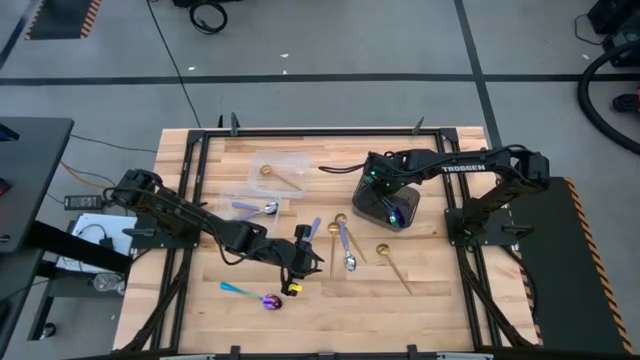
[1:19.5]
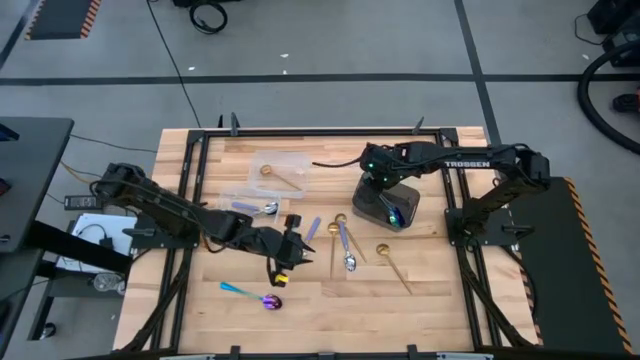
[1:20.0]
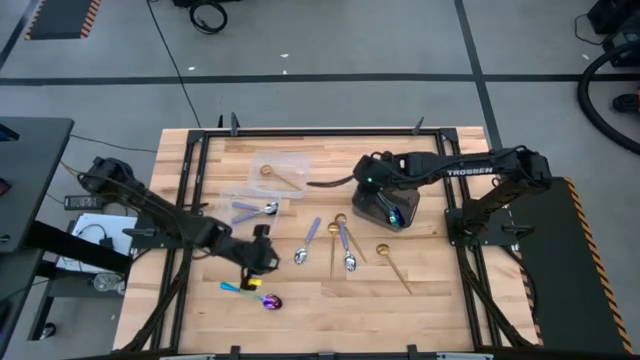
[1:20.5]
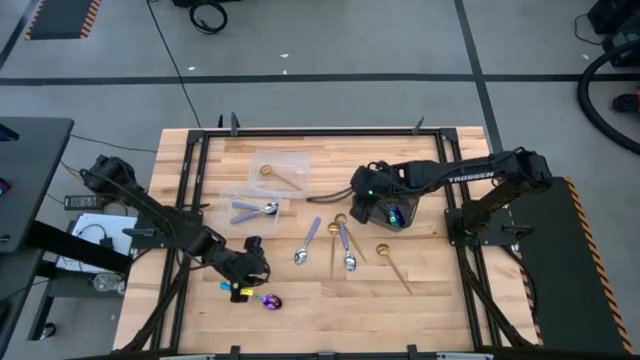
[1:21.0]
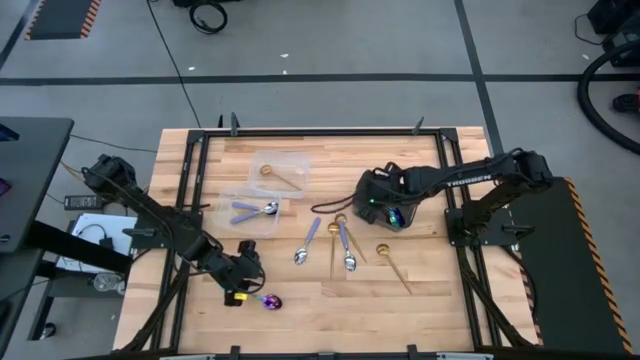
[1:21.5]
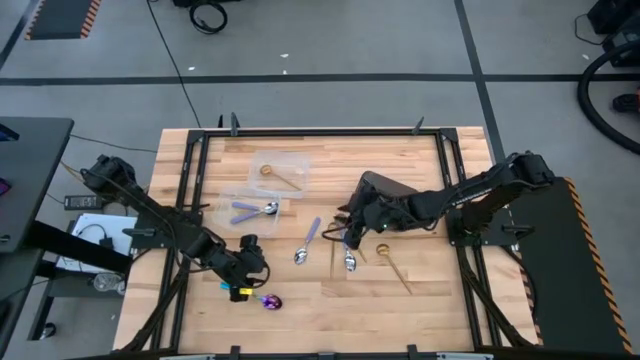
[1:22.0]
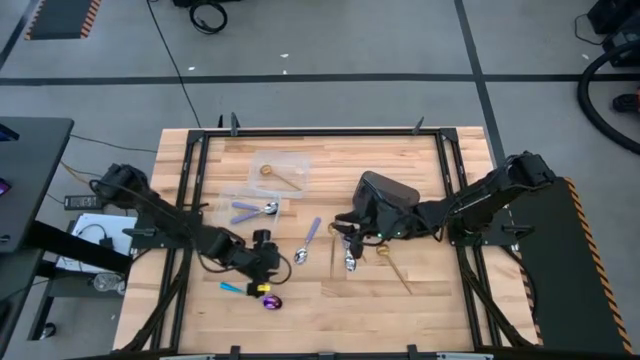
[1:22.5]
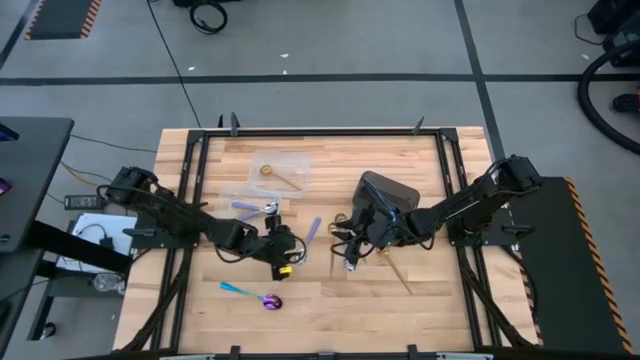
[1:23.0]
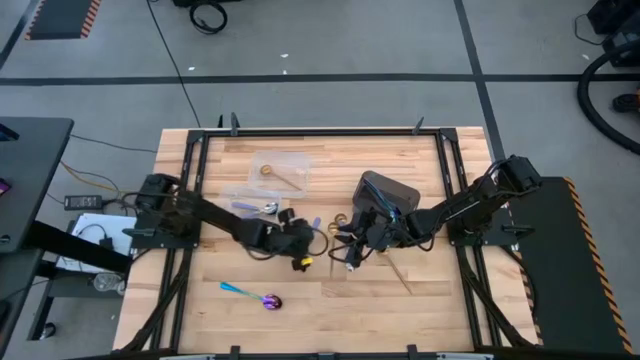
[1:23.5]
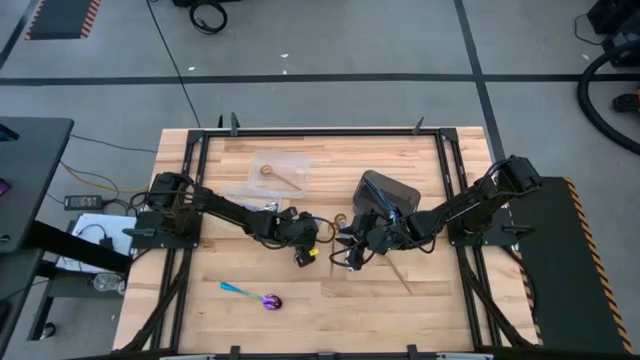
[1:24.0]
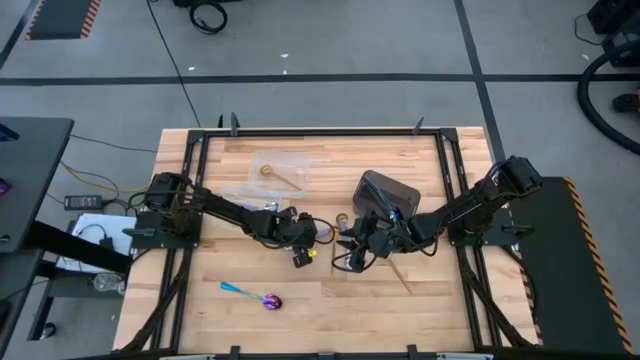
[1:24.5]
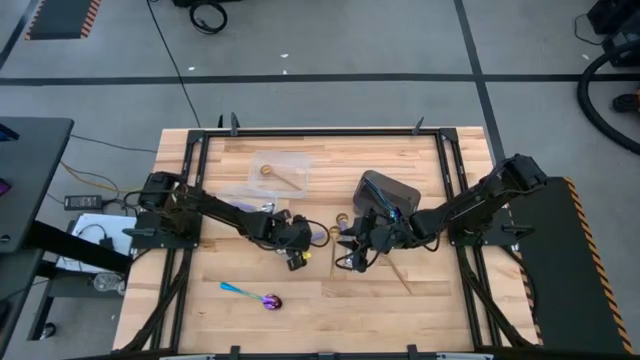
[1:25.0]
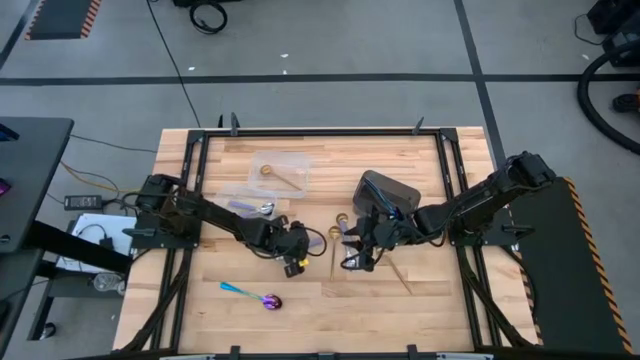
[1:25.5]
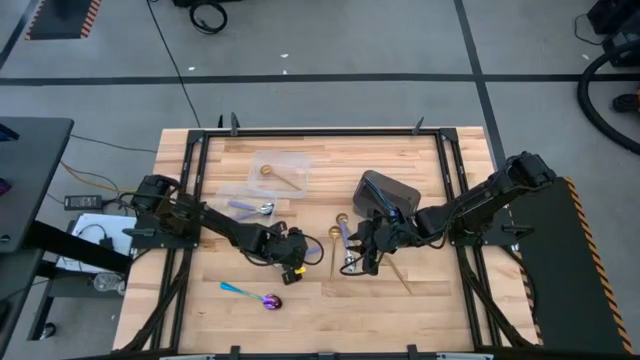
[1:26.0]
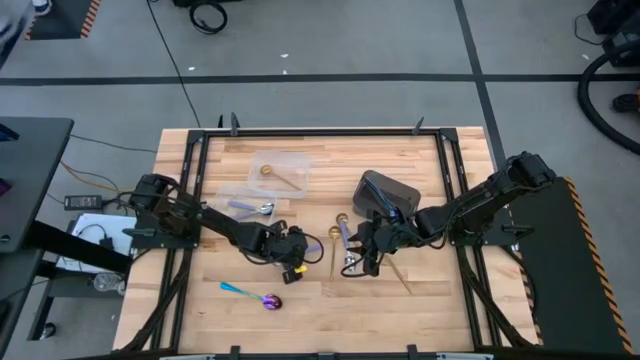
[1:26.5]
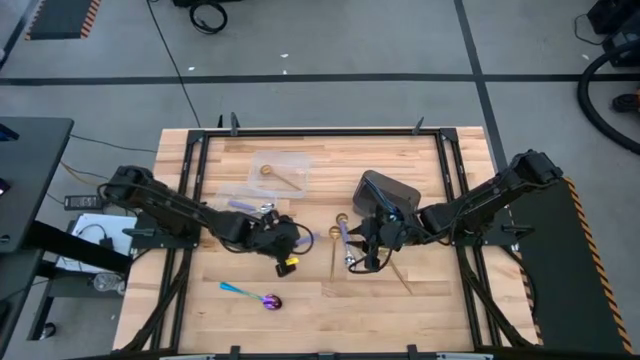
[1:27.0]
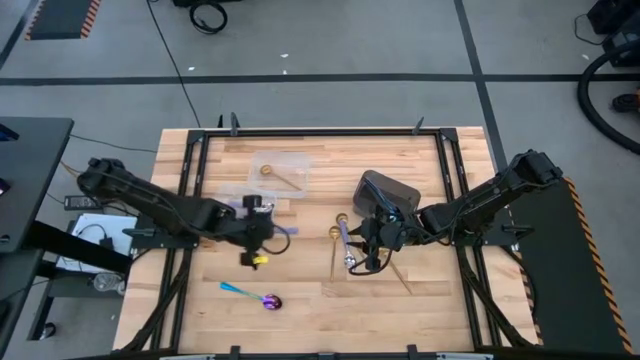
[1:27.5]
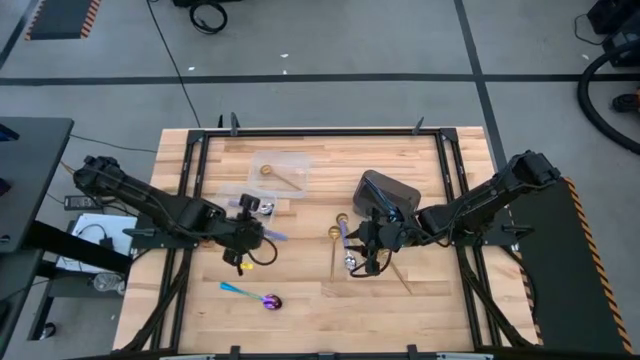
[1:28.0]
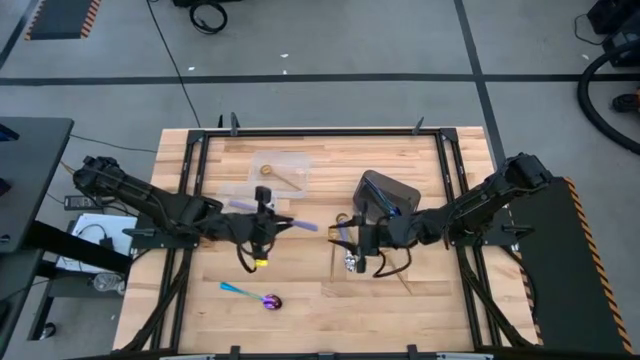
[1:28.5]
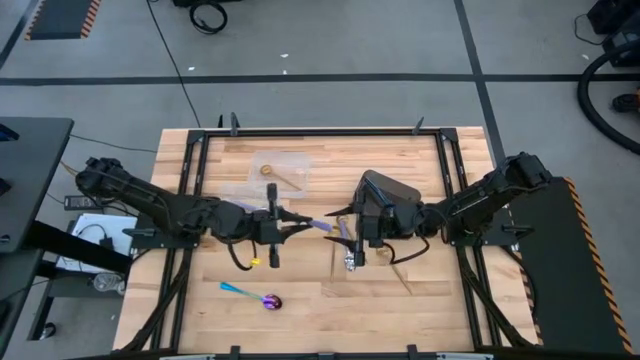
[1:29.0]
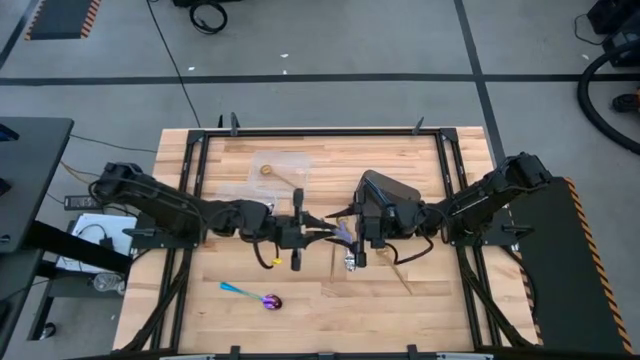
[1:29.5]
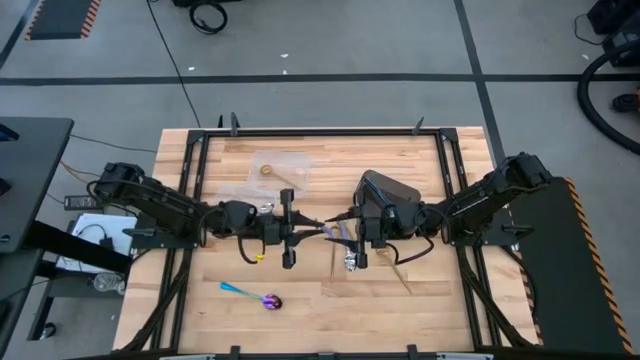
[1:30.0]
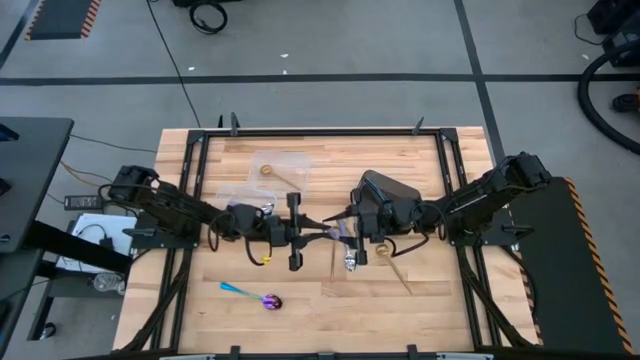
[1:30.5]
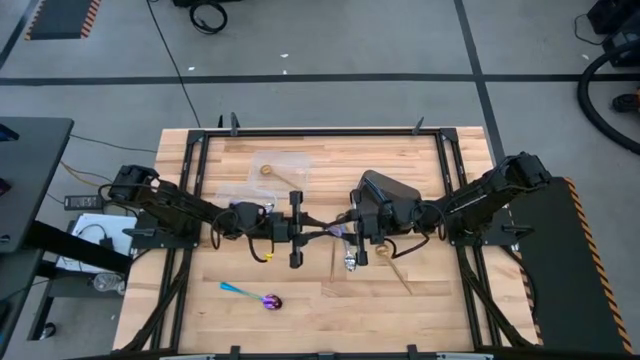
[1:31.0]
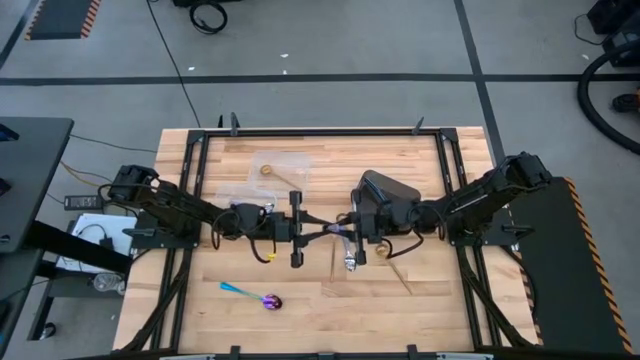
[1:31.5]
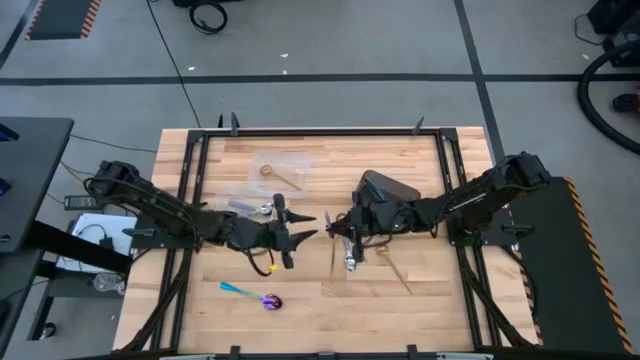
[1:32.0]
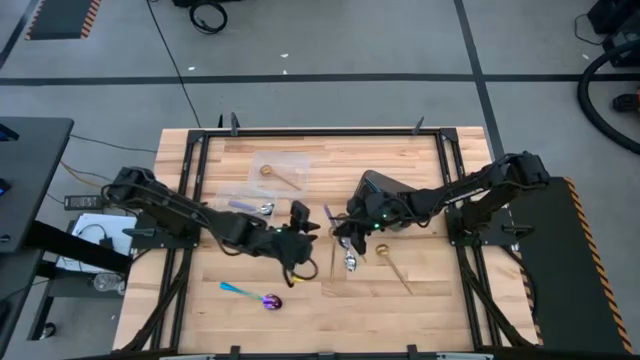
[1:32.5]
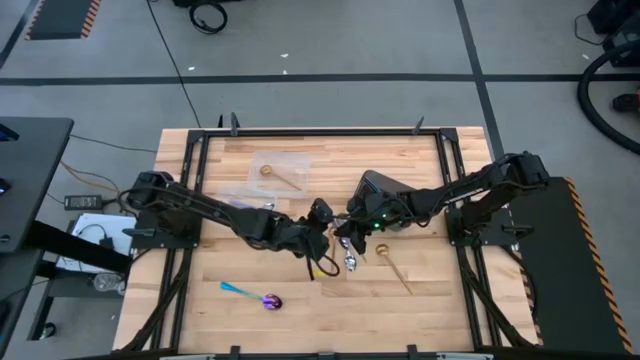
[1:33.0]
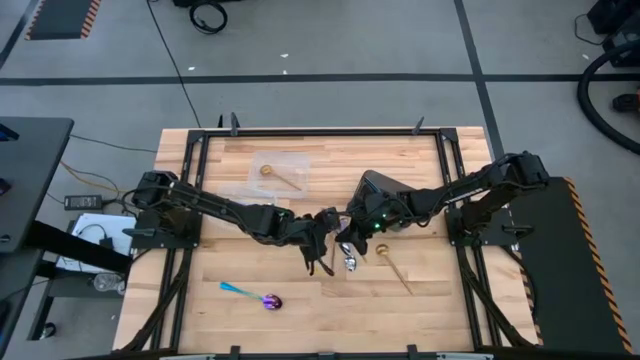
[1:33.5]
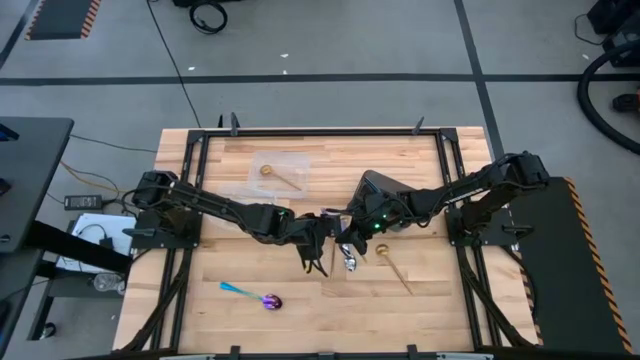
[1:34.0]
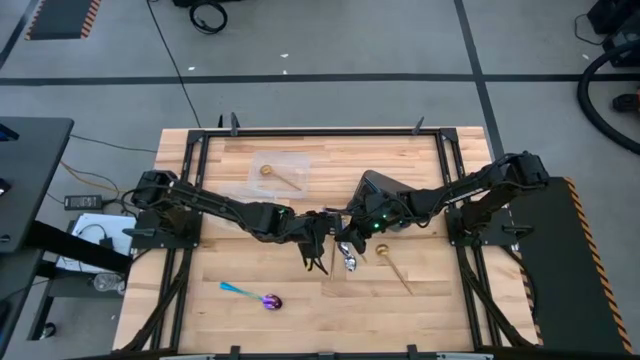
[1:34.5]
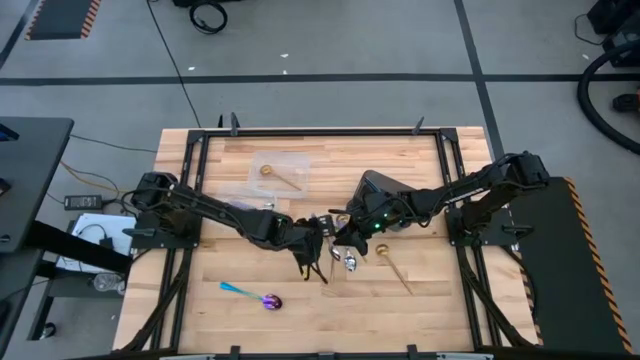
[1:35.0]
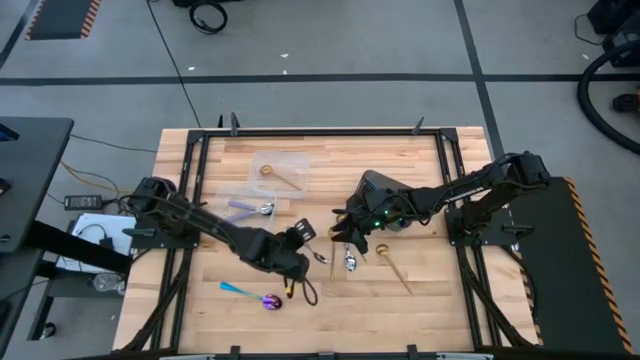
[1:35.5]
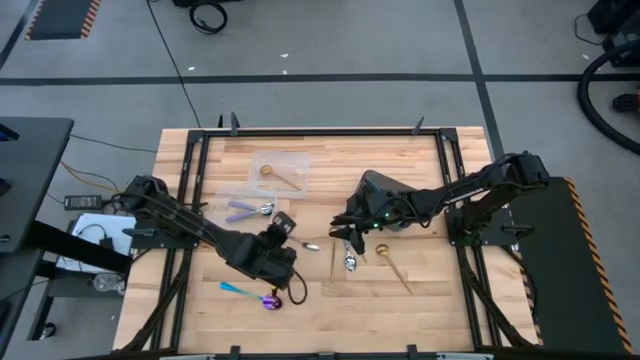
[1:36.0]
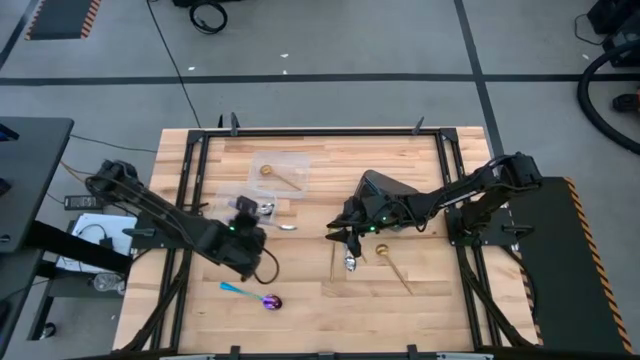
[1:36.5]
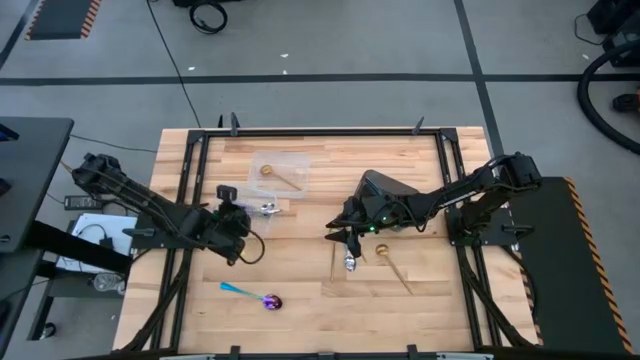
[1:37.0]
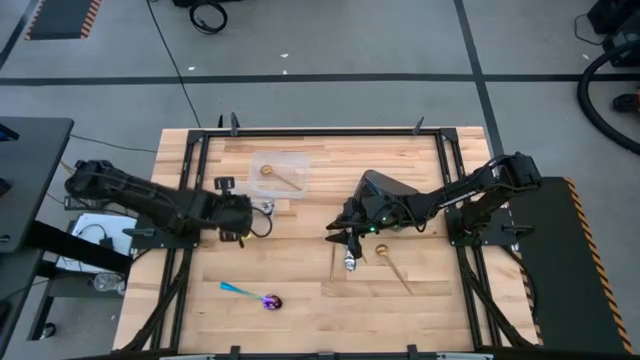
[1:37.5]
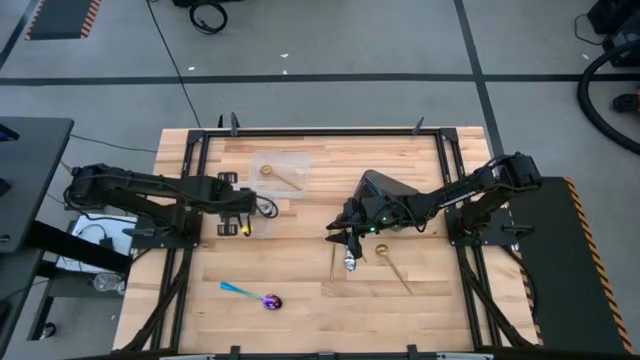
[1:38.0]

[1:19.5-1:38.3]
Task: Sort silverware by color (type)
Put the blue spoon into the bottom transparent bin

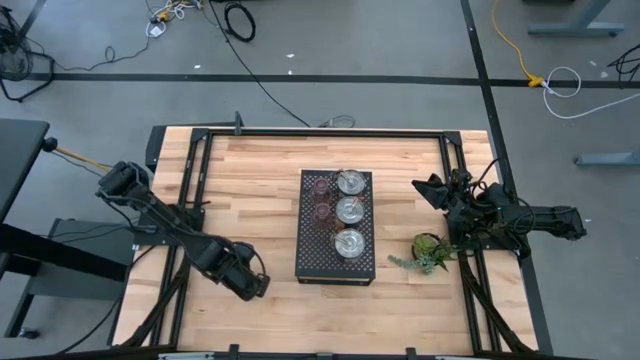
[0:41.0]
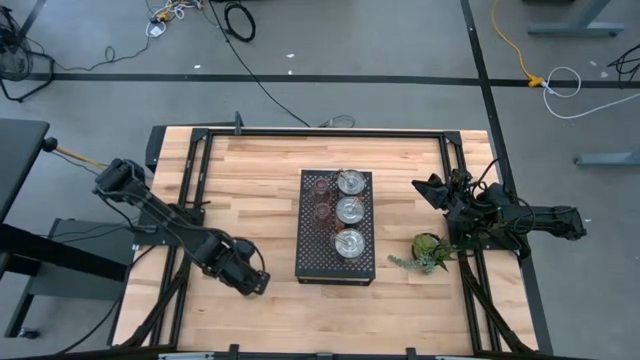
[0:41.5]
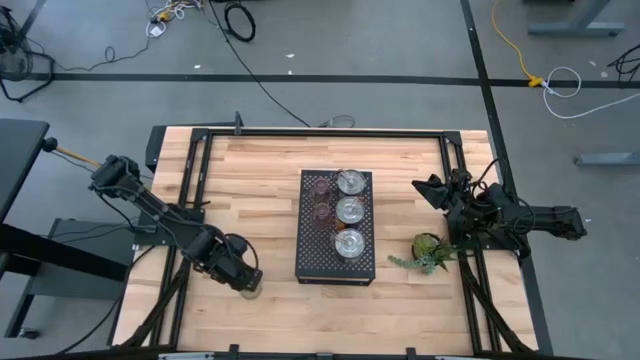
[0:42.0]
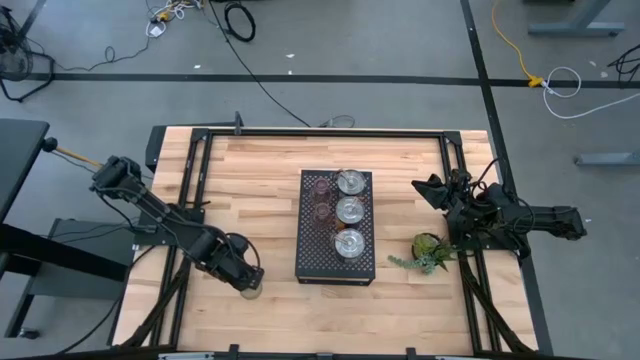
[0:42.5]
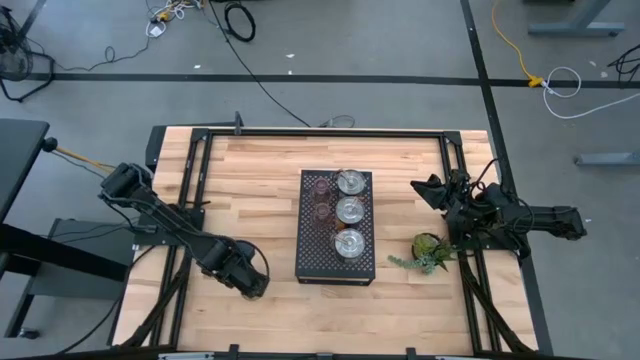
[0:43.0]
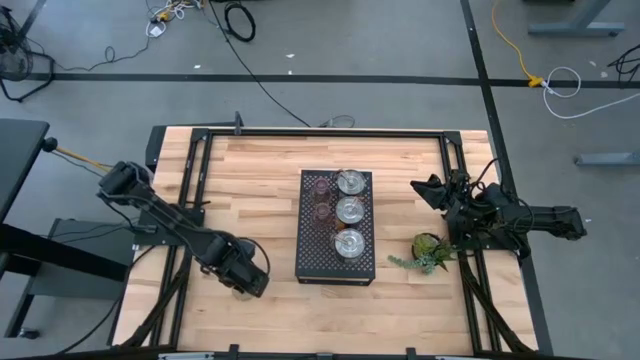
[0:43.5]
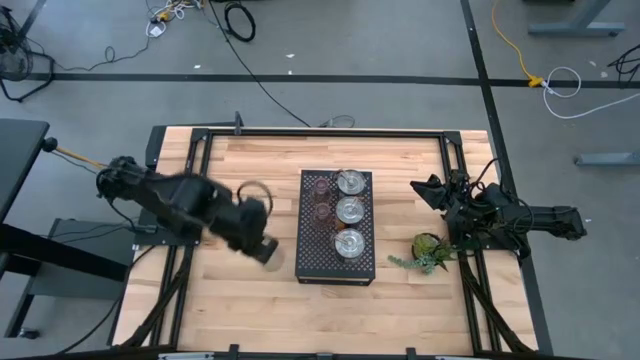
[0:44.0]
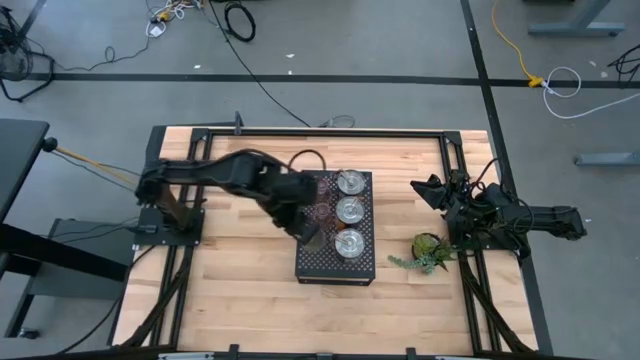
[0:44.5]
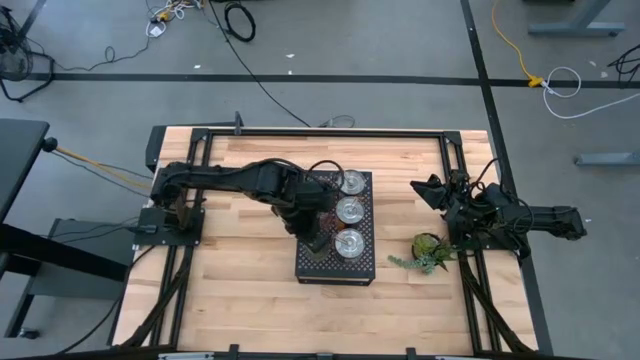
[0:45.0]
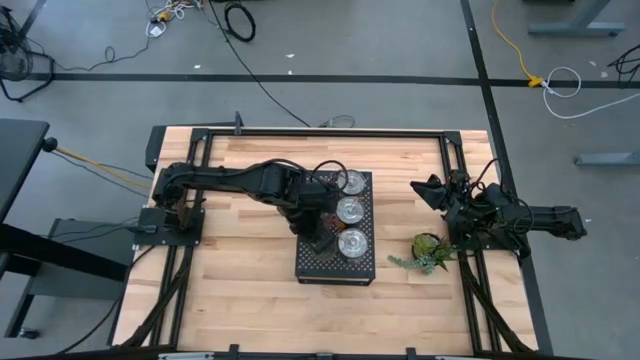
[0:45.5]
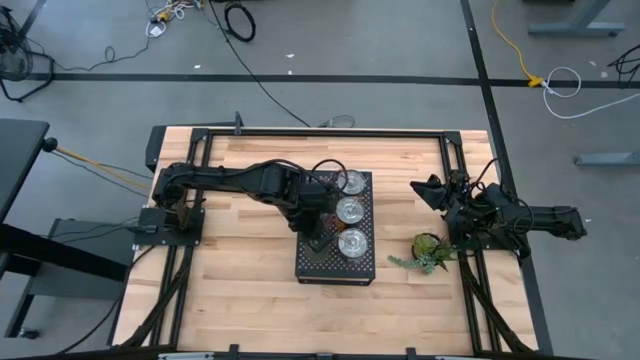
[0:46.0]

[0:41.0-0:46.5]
Task: Pick & Place candle stick holders
Put the green glass holder on the shelf
